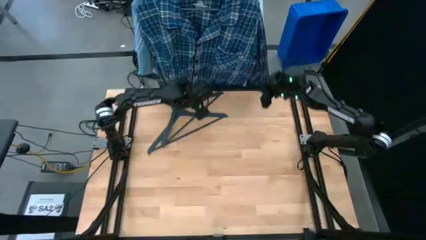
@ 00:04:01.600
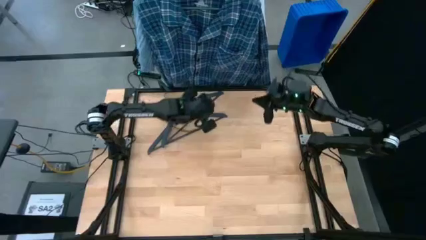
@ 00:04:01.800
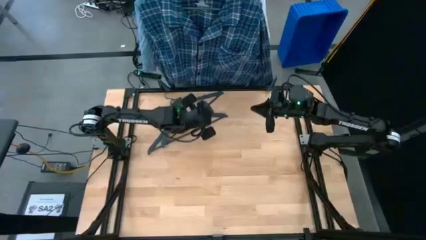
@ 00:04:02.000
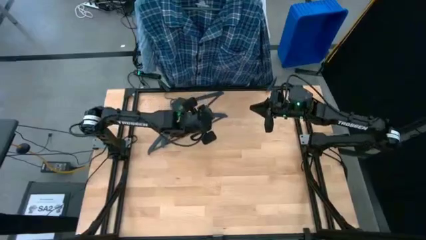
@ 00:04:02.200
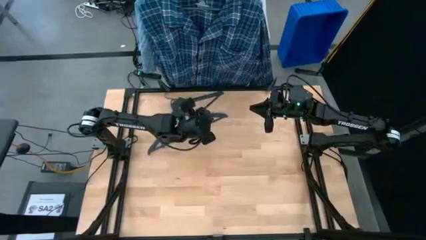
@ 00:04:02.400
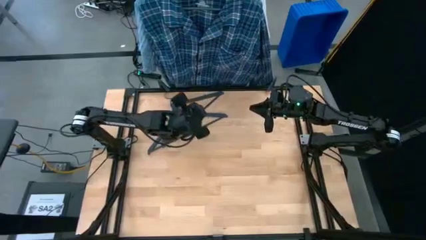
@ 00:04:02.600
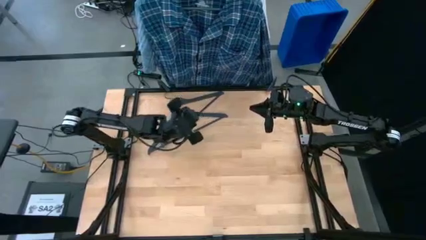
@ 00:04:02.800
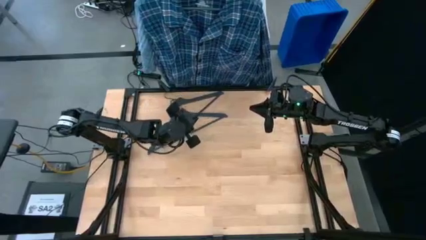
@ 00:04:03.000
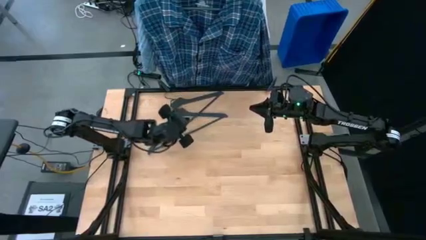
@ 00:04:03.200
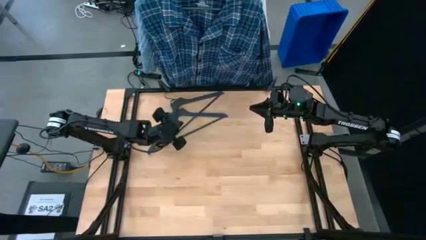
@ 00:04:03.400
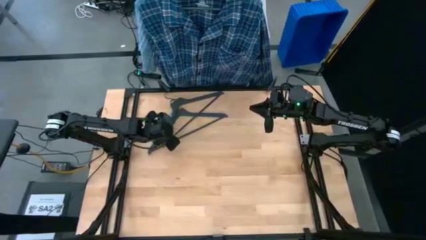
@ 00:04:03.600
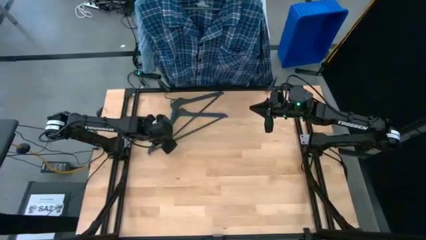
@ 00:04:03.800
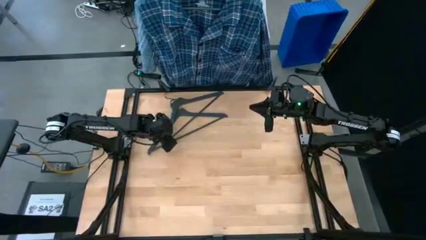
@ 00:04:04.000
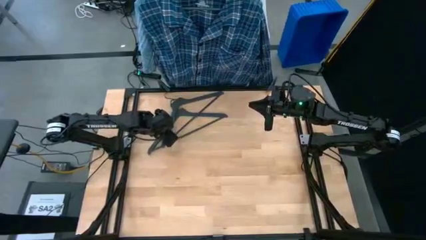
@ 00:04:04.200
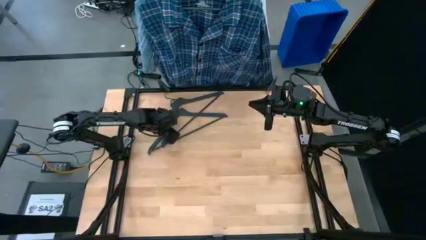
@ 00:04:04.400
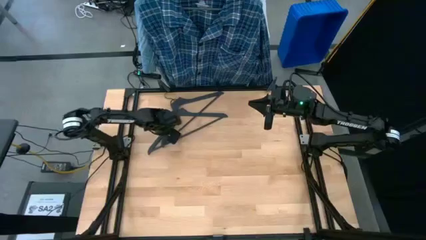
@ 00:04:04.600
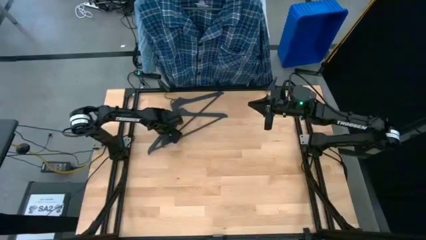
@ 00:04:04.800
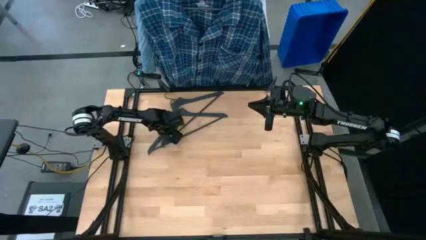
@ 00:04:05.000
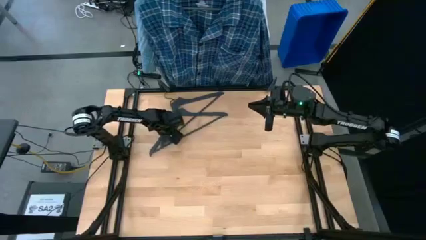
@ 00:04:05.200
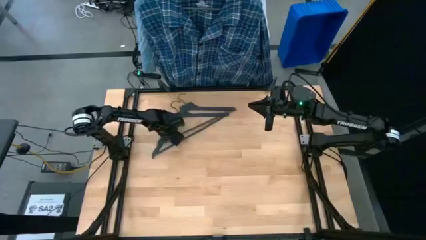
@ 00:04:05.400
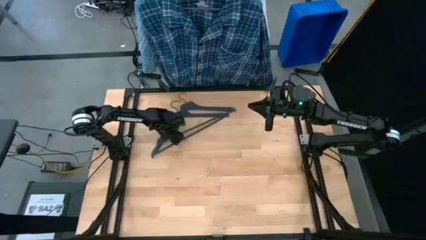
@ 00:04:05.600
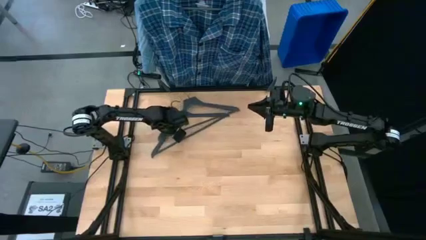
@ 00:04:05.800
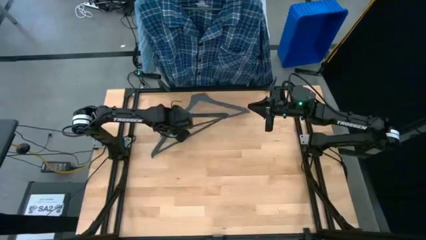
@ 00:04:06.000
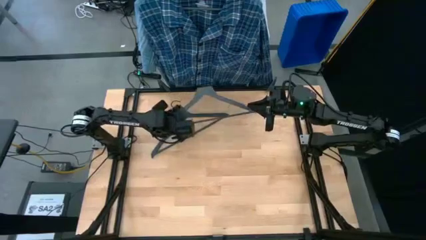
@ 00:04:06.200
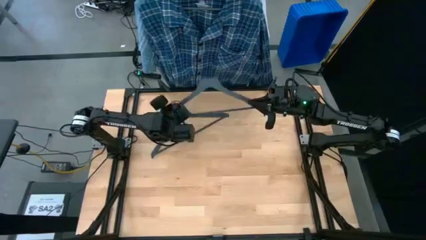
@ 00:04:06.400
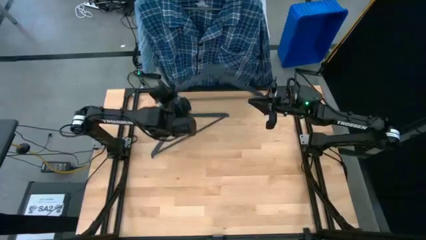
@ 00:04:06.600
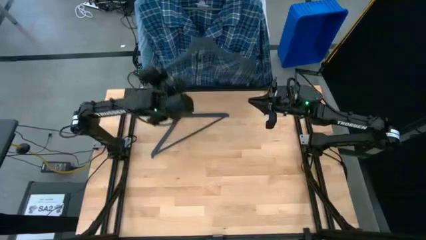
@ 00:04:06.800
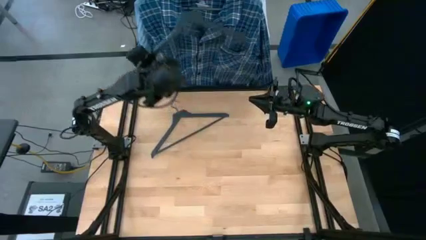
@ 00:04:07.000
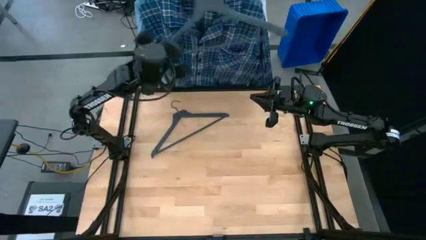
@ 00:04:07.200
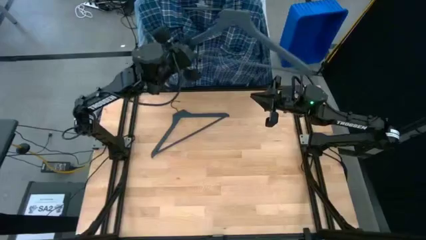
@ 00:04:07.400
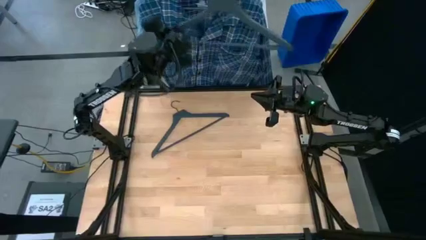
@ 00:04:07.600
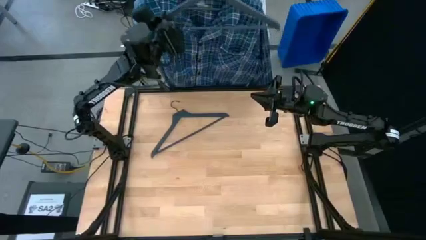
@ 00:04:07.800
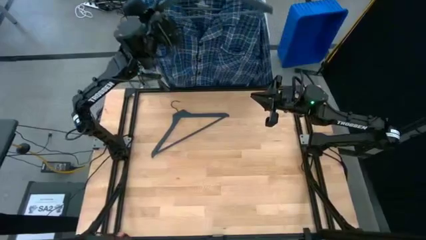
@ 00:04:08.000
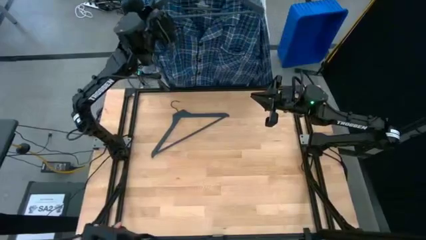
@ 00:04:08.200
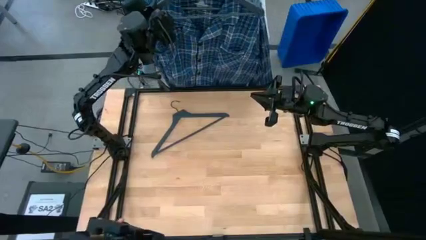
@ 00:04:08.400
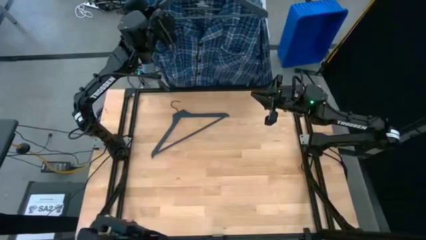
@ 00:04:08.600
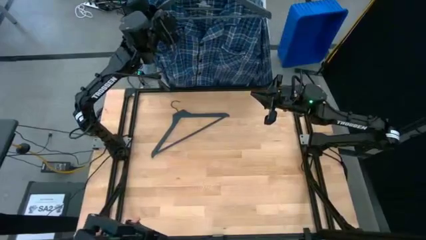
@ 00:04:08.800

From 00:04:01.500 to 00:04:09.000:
Task: Hang clothes
Hang the black hanger on the hanging rack

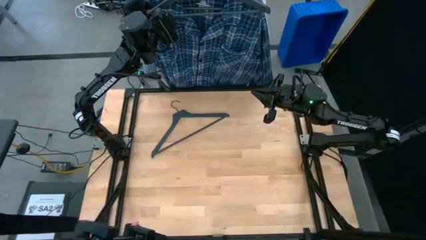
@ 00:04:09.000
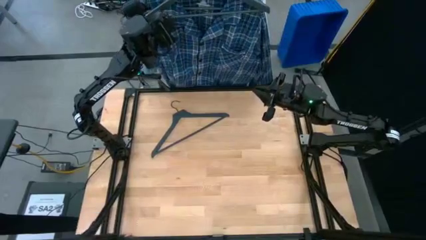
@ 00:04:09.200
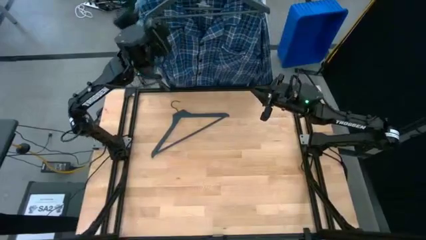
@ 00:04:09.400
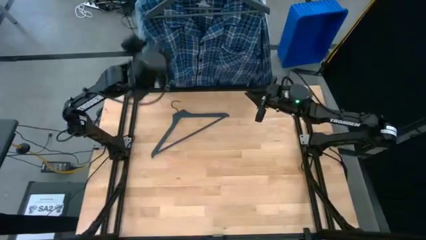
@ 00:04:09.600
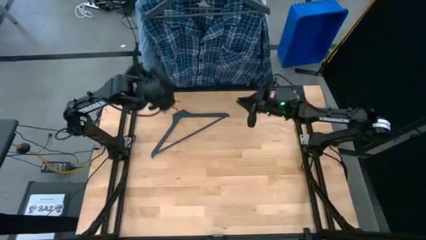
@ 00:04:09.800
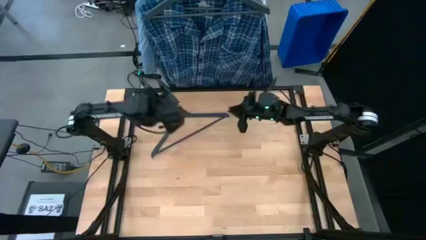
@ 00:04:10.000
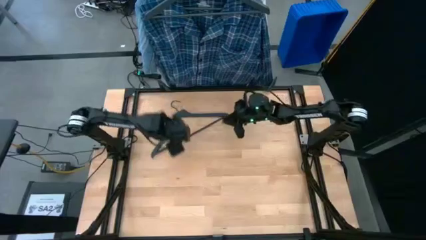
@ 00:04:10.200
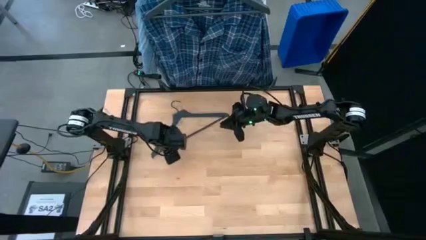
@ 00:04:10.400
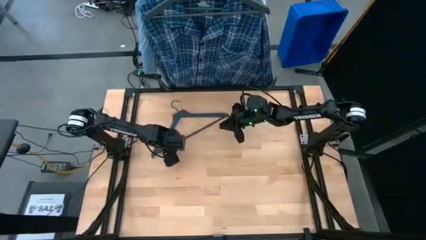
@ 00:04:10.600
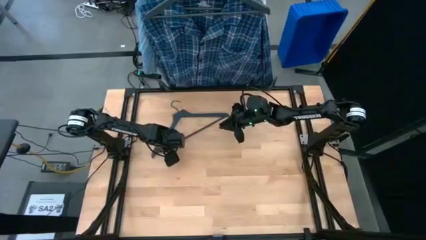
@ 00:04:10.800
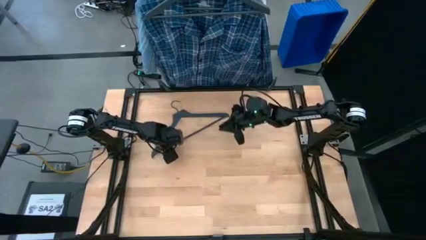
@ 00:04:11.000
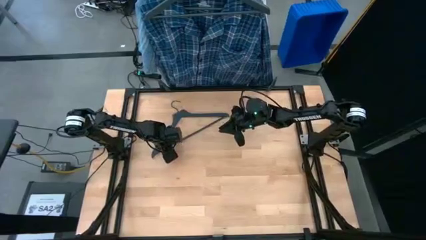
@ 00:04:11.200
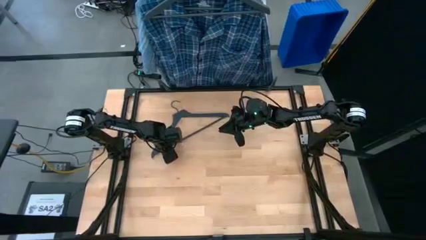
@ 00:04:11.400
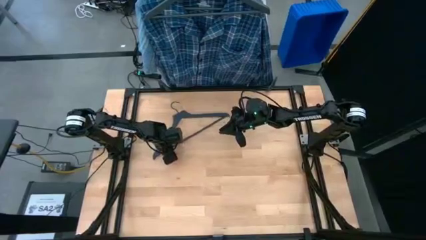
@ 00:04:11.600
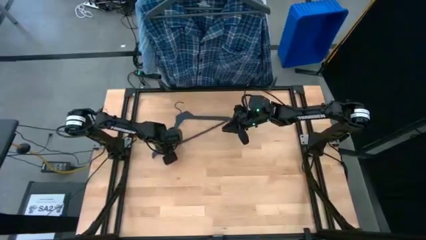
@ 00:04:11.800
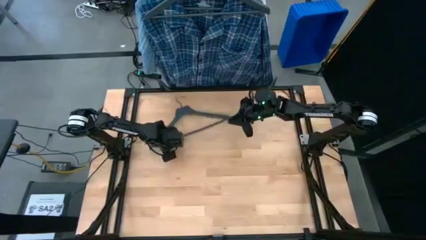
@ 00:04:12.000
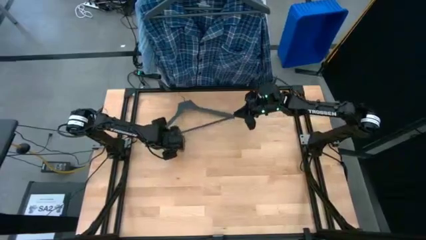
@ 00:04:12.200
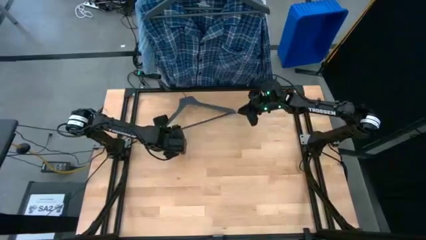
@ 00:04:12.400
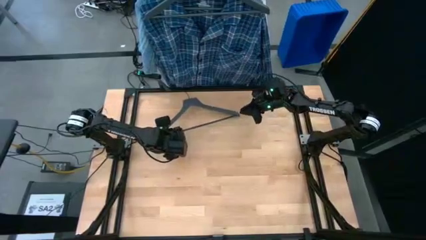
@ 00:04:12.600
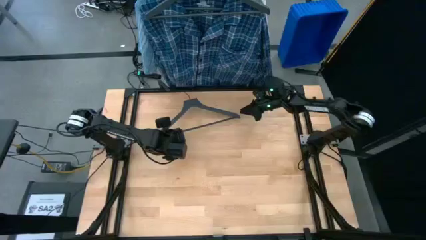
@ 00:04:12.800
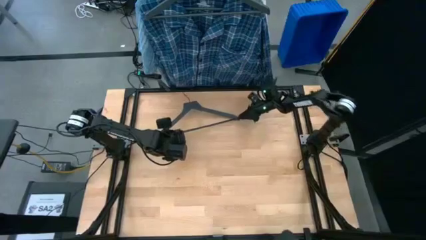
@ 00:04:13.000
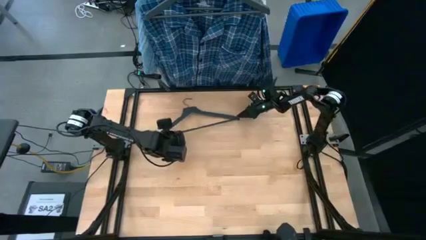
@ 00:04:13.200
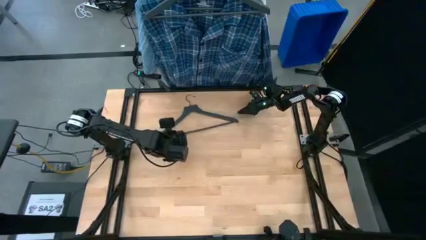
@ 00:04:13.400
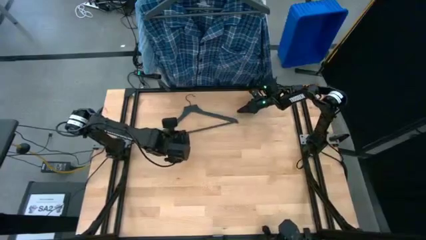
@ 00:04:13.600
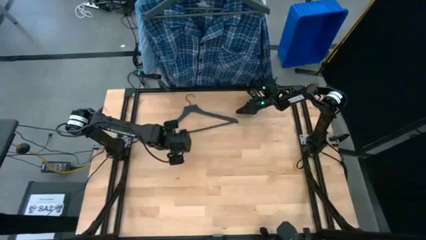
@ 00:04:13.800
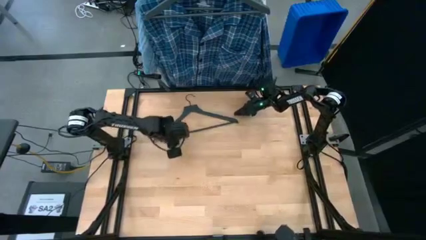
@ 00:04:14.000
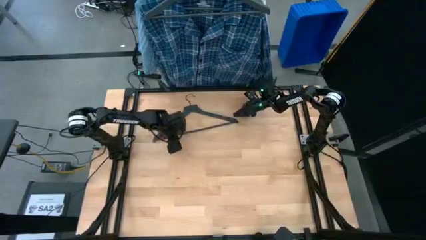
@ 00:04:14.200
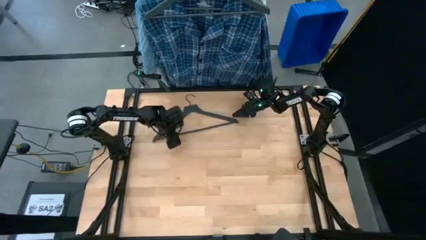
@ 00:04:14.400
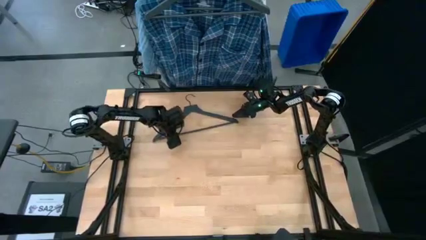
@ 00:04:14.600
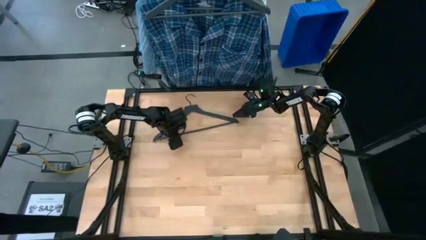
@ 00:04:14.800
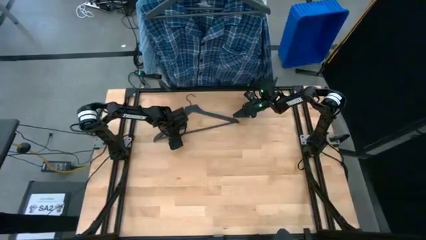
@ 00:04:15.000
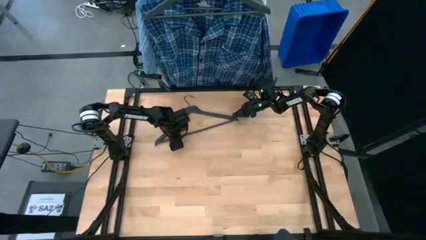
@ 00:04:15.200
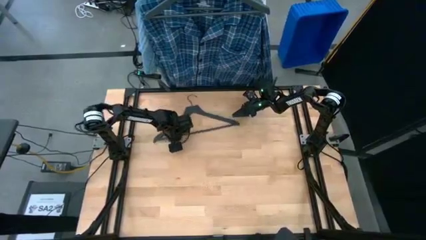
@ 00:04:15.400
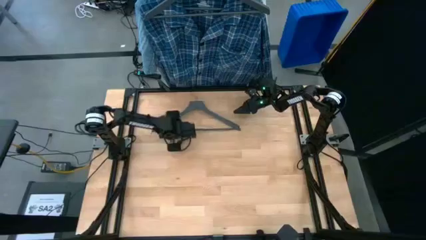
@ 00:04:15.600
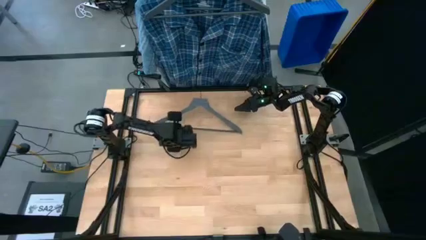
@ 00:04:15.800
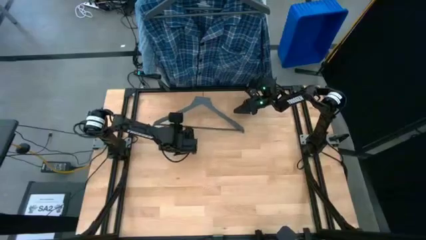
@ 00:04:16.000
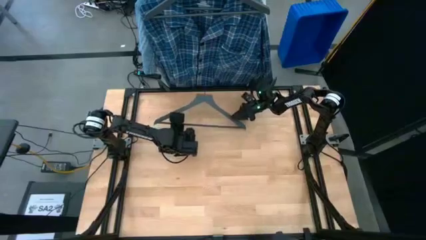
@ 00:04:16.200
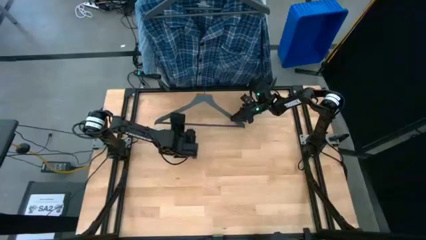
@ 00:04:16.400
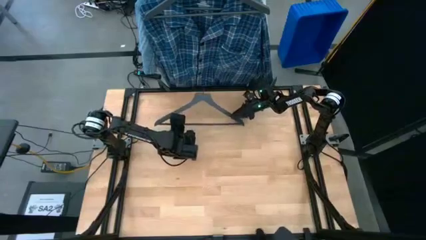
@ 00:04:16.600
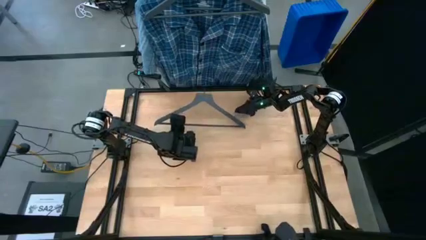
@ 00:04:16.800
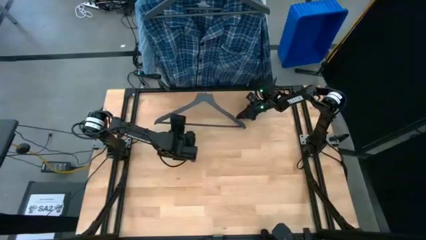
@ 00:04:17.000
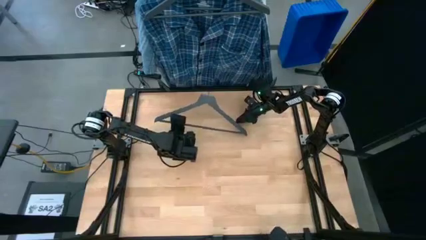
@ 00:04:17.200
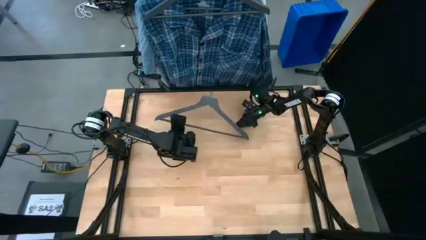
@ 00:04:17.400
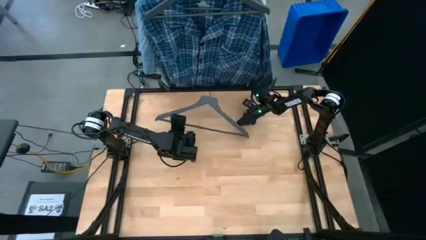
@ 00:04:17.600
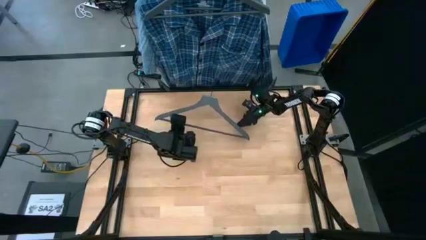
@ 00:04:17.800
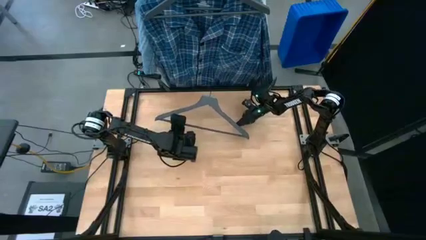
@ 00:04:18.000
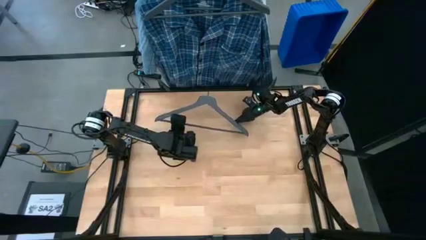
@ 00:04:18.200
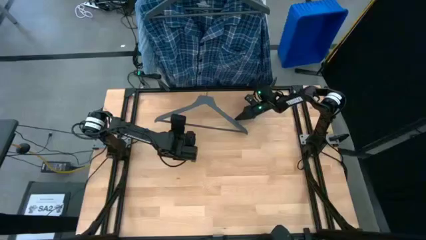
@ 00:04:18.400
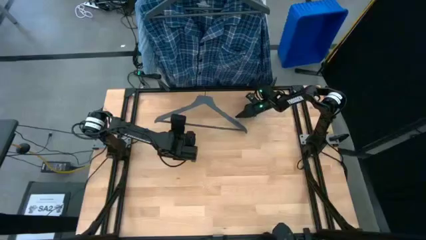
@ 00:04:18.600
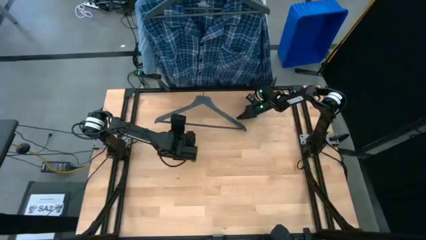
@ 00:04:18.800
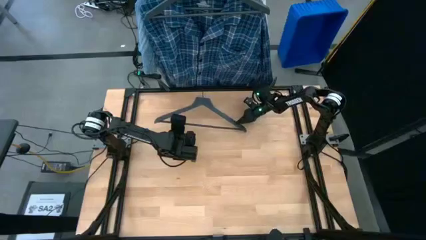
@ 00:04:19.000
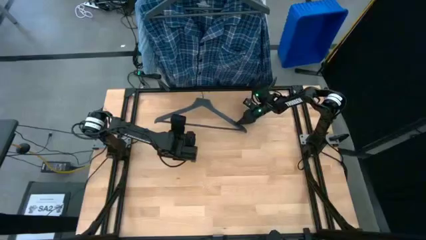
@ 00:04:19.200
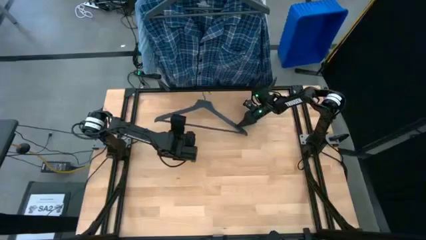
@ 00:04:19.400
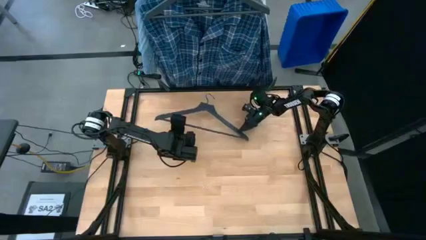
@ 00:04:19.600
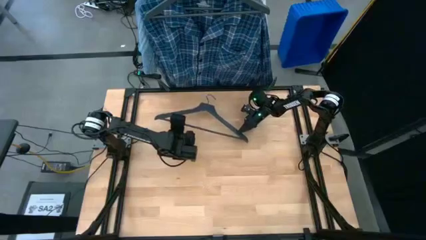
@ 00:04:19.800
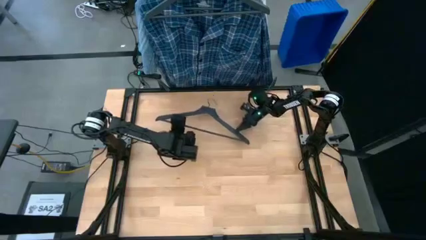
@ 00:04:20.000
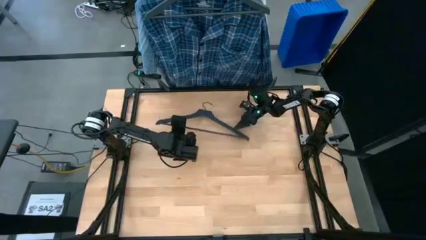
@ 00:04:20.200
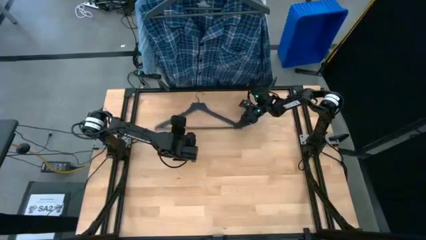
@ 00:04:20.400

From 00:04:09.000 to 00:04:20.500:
Hang the black hanger on the hanging rack
